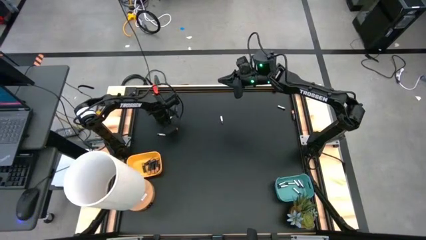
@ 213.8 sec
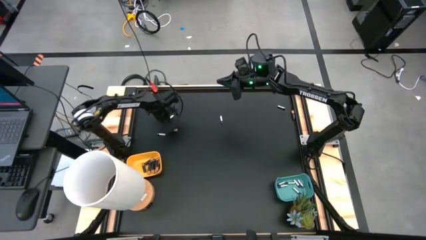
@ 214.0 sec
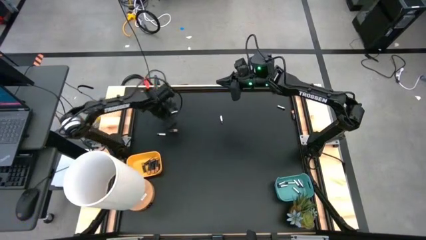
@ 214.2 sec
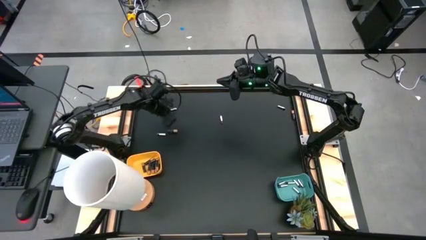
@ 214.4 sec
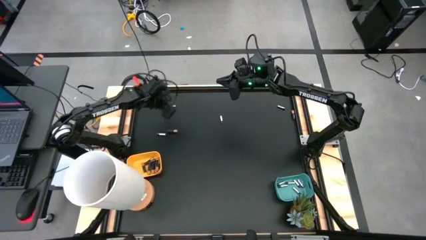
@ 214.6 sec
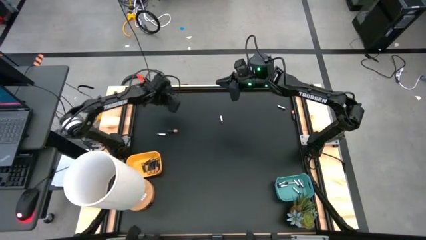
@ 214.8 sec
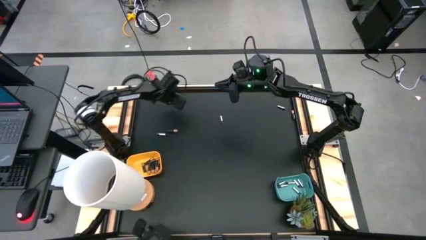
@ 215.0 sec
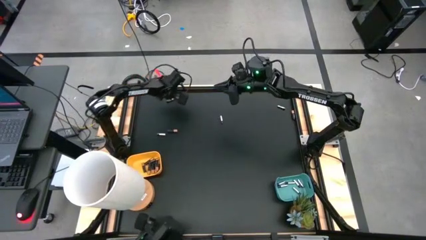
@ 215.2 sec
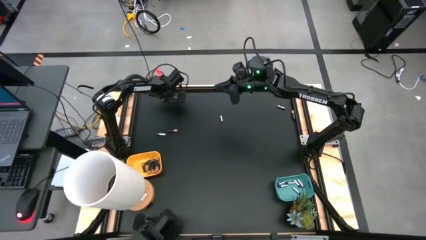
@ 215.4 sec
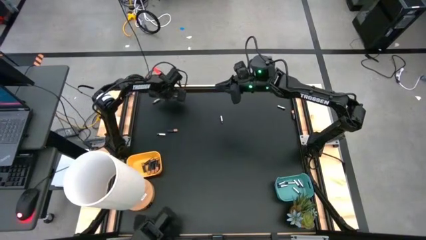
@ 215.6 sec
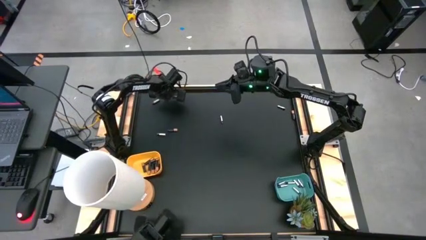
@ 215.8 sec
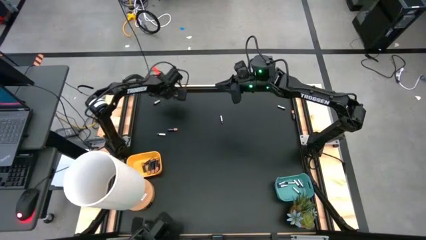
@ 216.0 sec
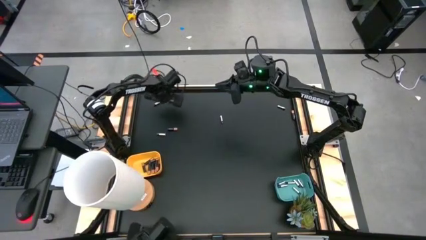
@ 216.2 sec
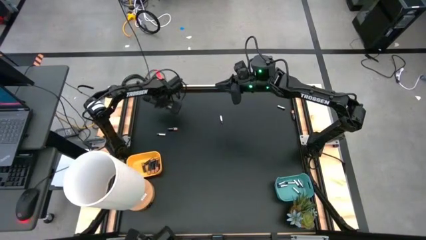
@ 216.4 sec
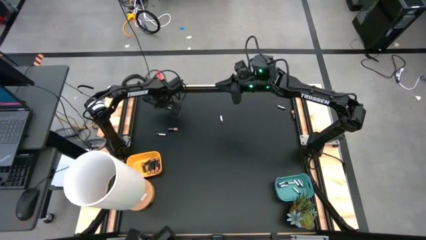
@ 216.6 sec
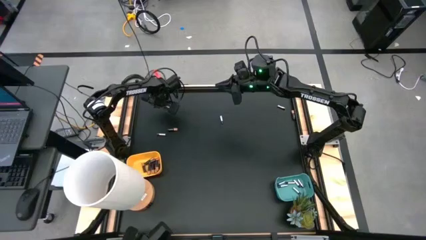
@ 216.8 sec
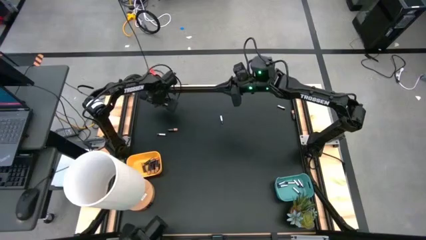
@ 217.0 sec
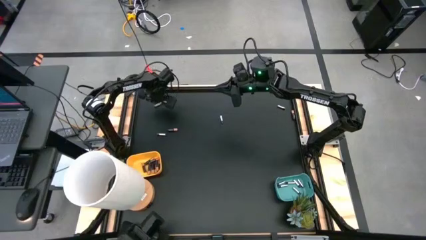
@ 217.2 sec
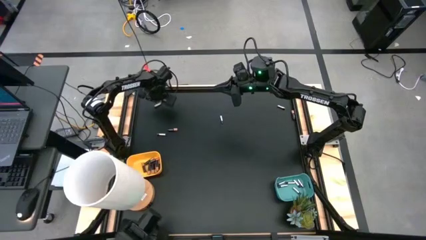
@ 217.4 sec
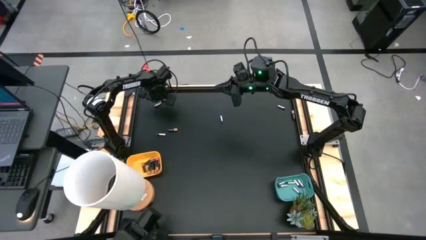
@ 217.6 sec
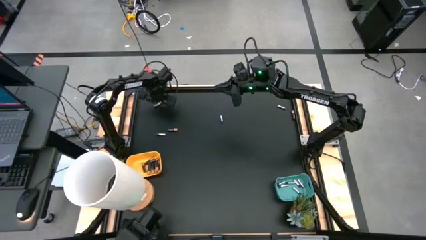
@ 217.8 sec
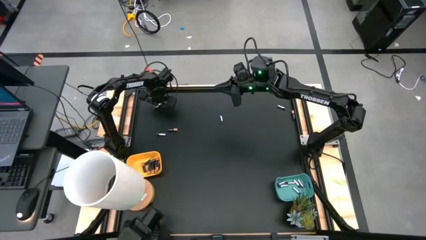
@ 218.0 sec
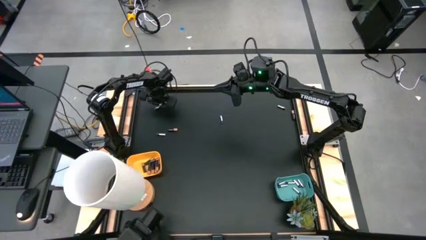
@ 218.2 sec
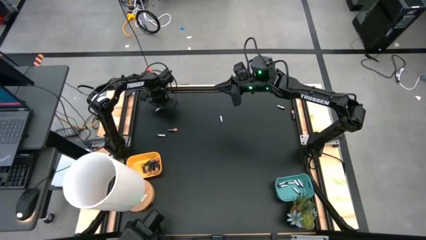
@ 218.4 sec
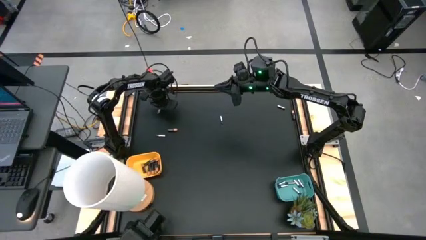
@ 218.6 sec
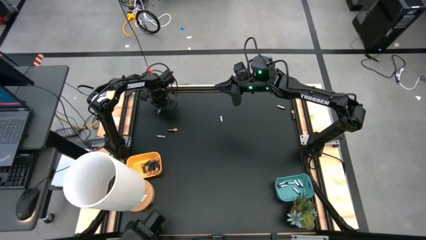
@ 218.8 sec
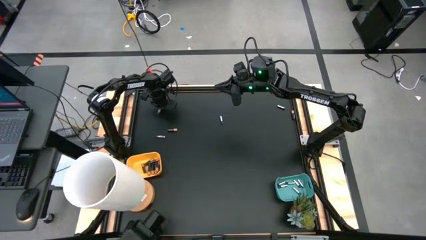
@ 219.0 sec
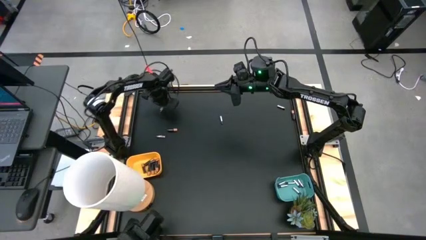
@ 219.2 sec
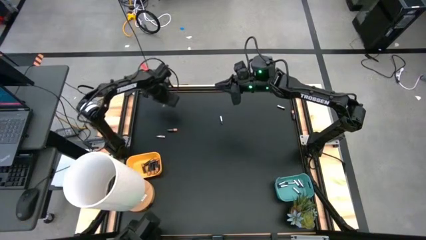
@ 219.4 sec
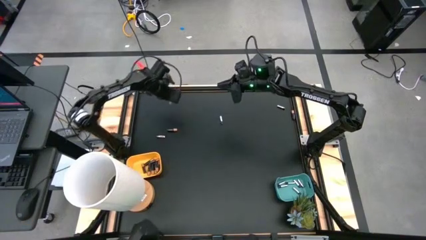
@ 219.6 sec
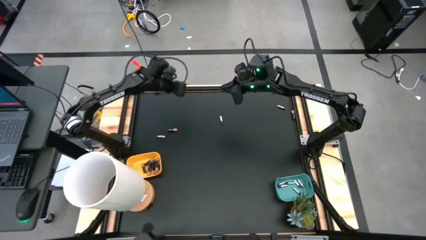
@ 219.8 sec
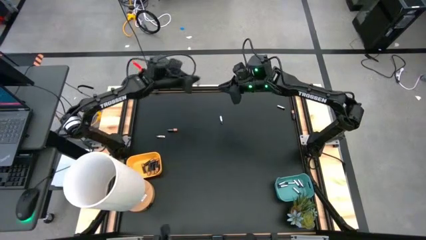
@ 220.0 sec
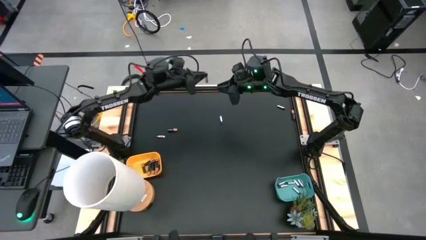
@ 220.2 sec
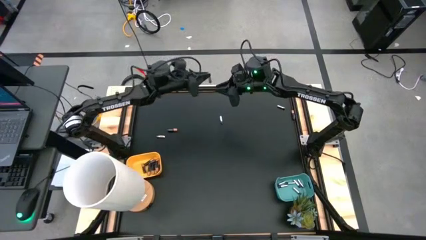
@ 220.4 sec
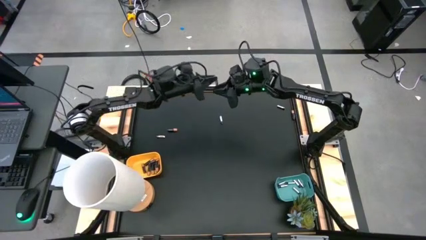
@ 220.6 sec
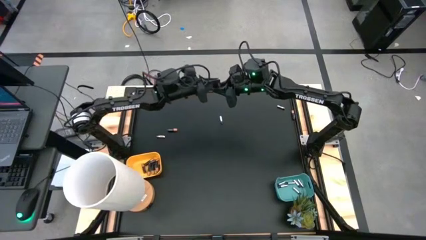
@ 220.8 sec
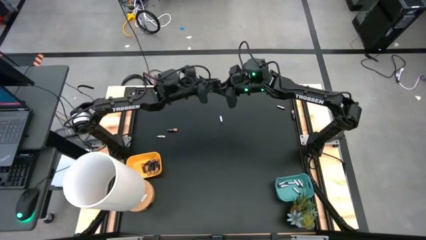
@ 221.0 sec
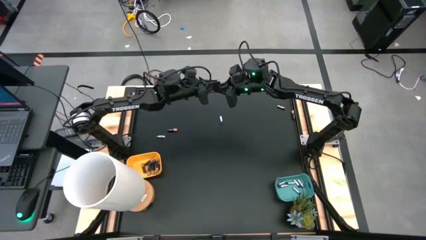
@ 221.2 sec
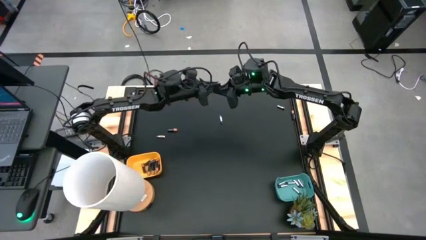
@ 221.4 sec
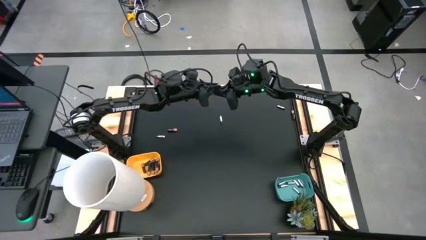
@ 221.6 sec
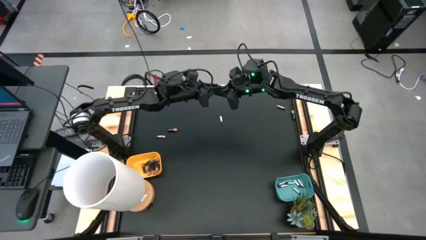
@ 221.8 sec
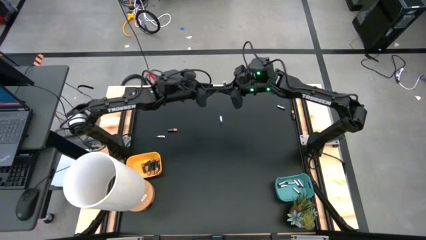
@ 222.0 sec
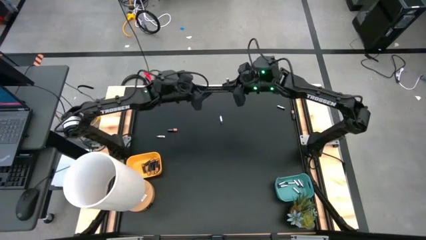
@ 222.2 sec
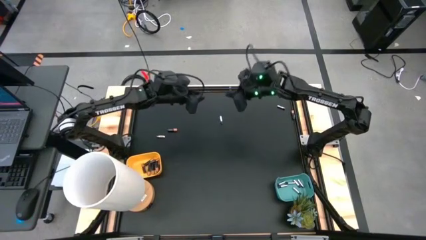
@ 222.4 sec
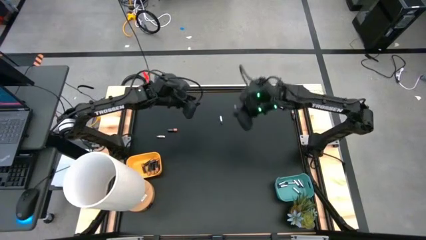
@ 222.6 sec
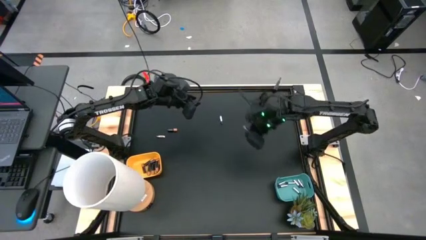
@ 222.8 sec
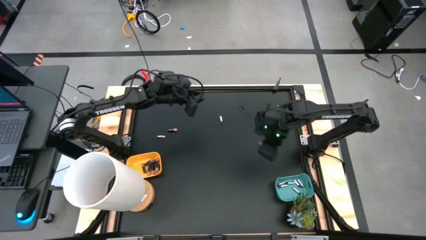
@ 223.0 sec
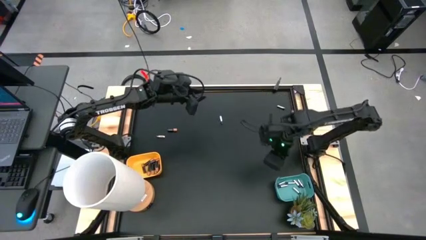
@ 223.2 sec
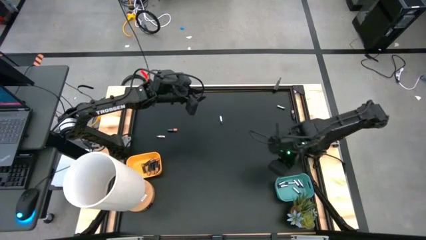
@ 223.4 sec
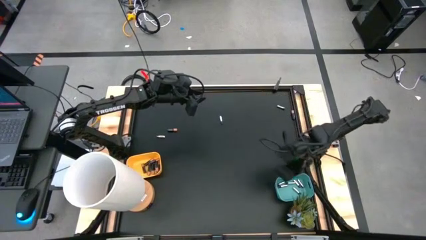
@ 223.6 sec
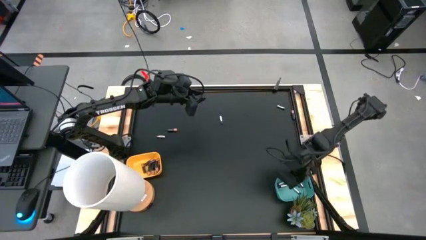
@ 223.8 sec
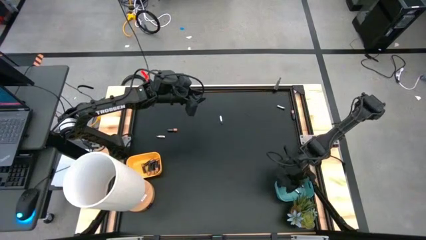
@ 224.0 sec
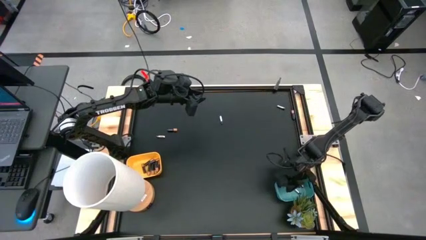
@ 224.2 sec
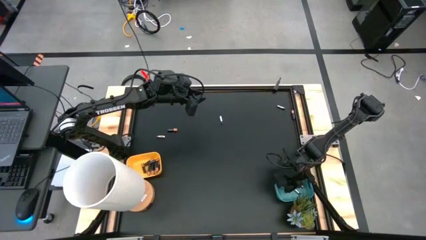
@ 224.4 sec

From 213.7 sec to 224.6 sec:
Task: Sort batteries
Put the silver battery into the green bin

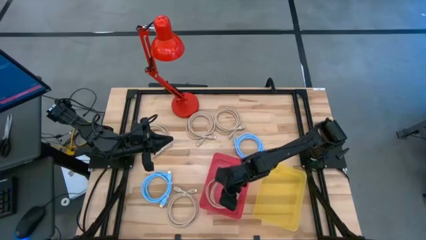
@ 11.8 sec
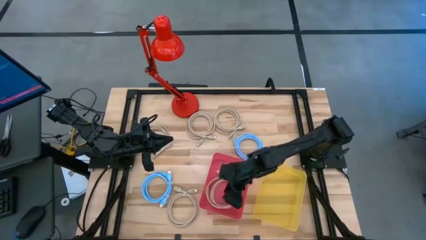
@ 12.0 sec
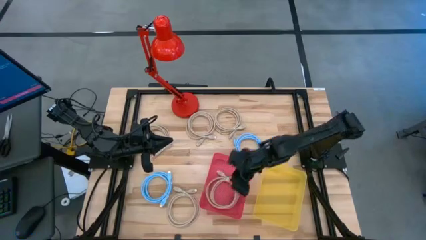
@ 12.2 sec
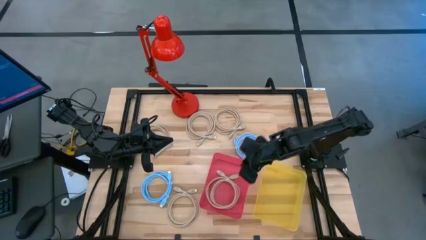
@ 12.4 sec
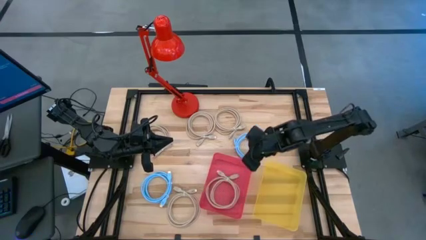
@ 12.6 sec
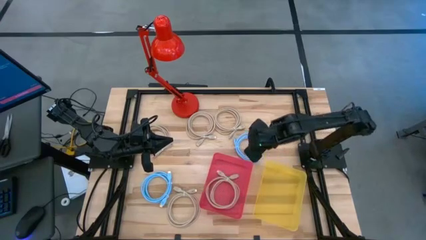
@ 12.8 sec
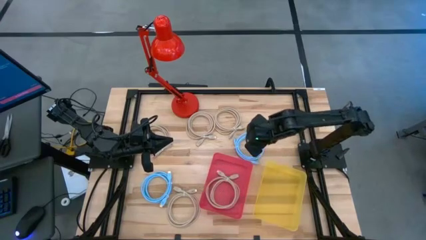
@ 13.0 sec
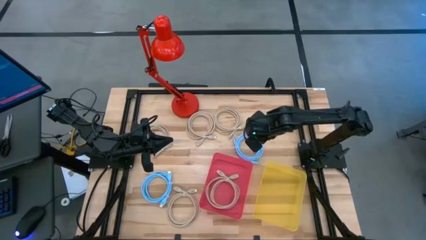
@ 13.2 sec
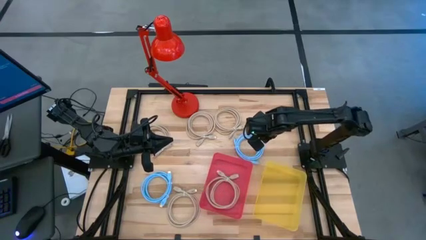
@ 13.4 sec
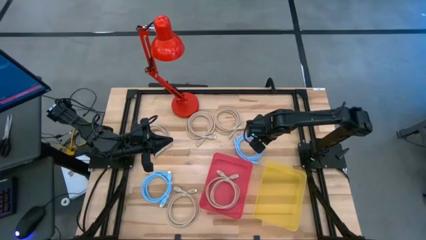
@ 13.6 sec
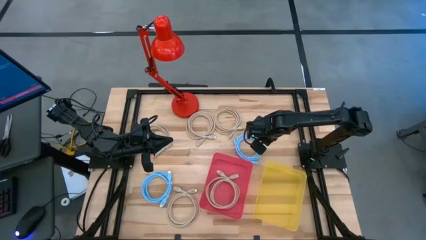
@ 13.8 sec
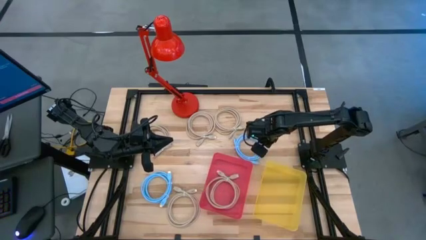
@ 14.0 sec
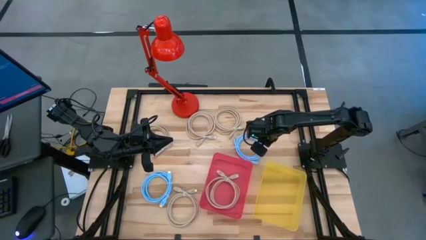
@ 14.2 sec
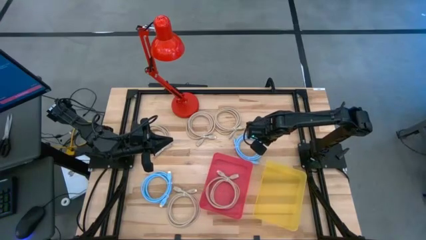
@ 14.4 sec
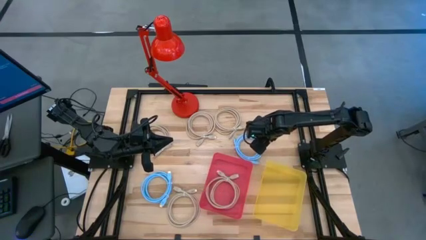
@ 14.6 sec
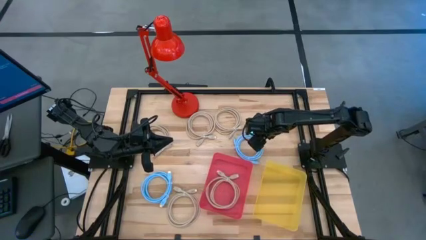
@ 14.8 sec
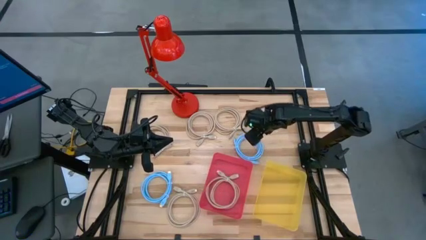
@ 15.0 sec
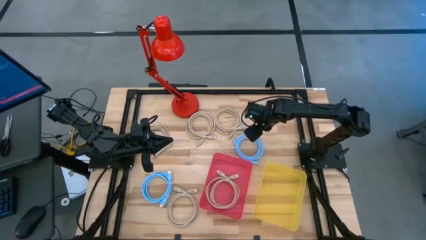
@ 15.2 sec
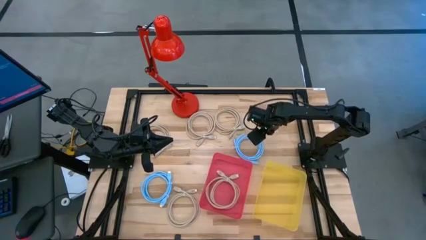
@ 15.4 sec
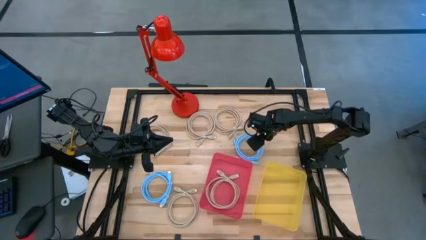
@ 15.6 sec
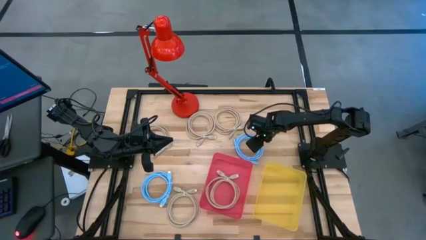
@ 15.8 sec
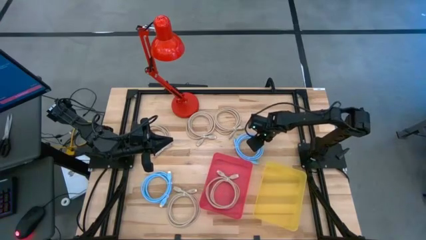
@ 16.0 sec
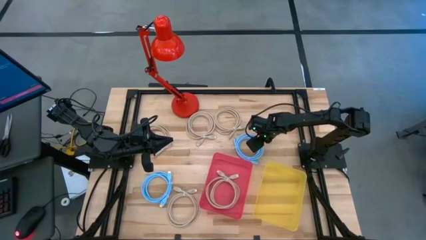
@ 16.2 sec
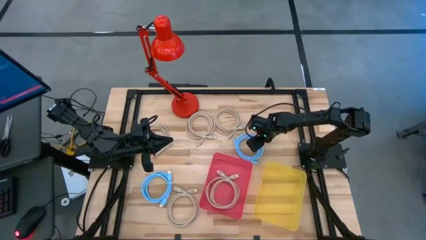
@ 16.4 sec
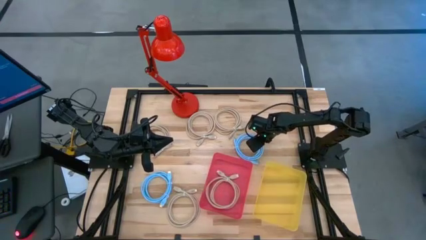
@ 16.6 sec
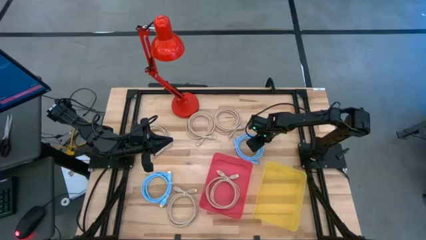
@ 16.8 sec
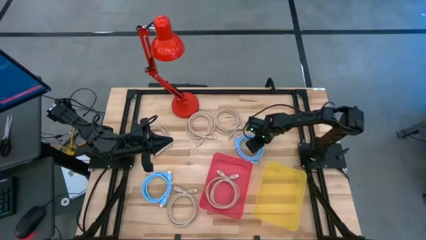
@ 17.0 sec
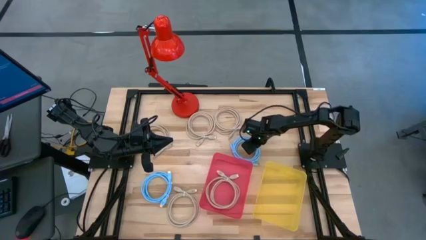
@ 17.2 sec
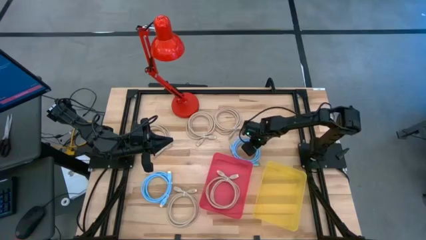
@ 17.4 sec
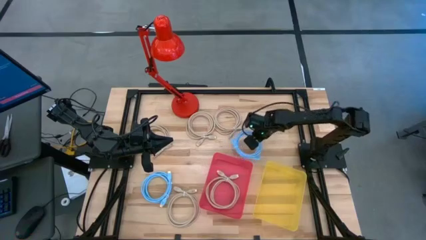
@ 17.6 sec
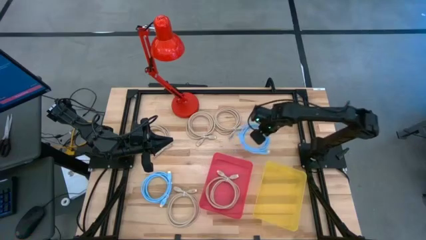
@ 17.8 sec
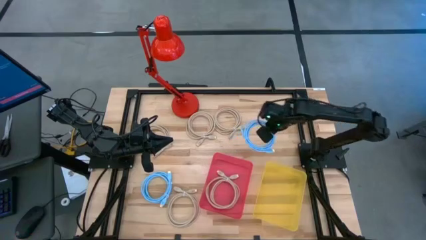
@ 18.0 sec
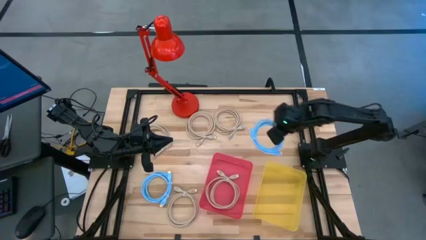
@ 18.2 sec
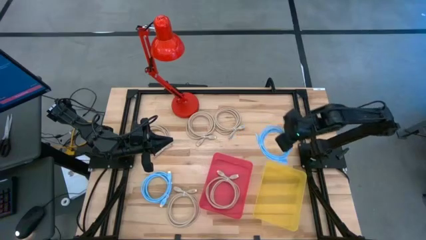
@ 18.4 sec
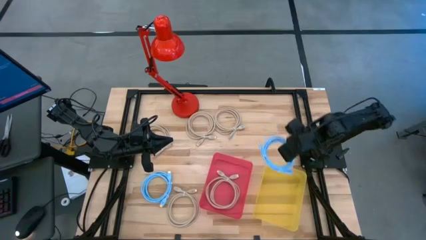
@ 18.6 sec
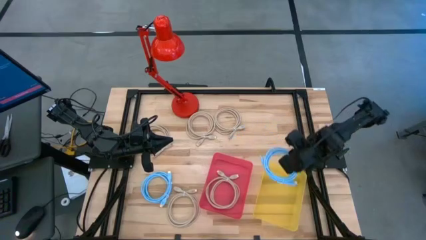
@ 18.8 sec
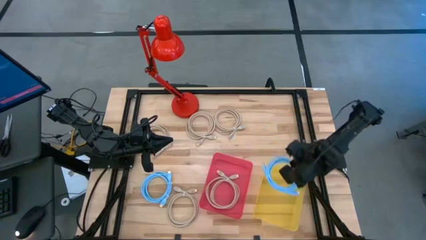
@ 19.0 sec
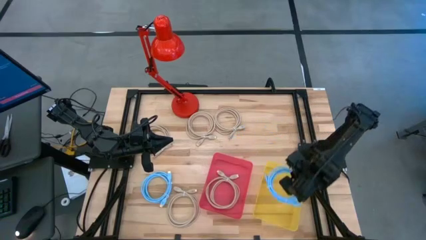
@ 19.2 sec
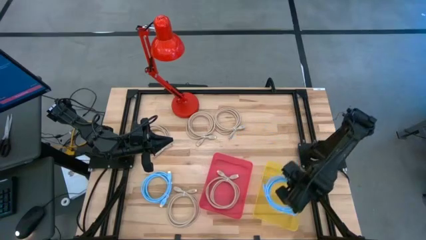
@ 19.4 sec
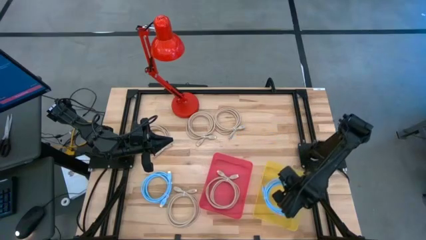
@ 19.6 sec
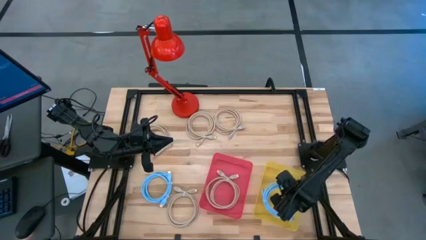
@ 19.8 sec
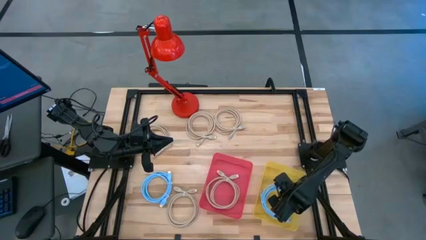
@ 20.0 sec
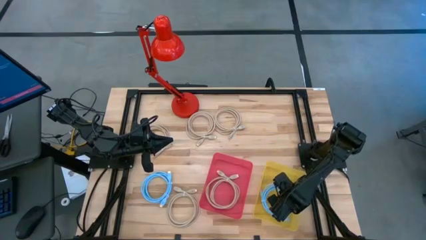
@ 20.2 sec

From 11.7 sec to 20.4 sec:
Task: Sort HDMI cables
Put the blue HDMI cable into the yellow bin
